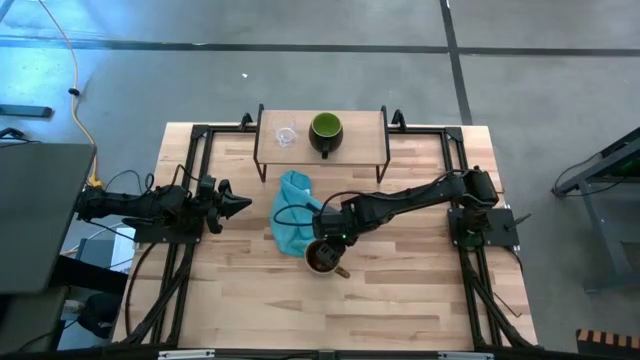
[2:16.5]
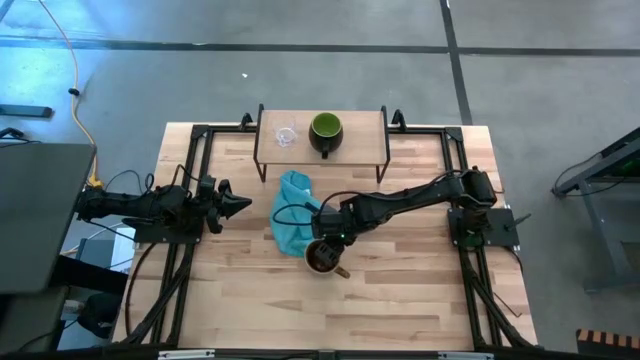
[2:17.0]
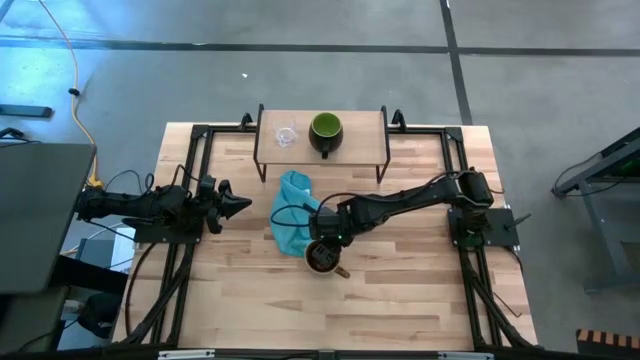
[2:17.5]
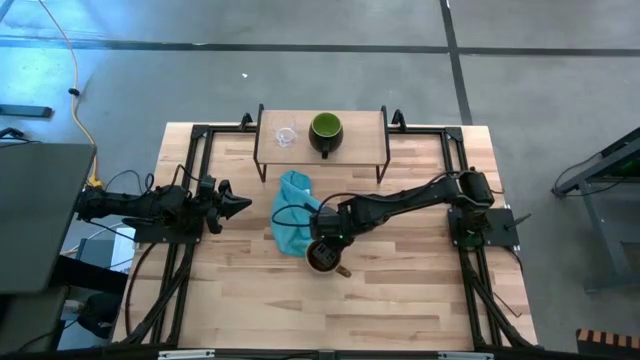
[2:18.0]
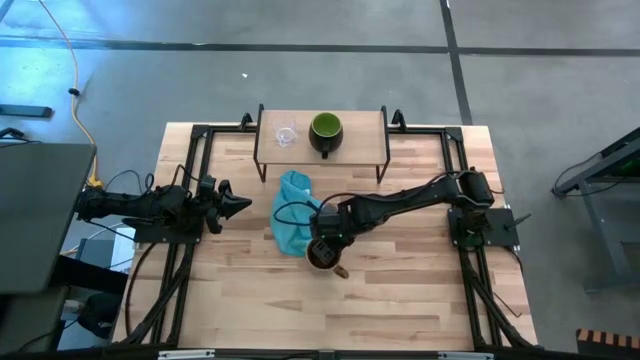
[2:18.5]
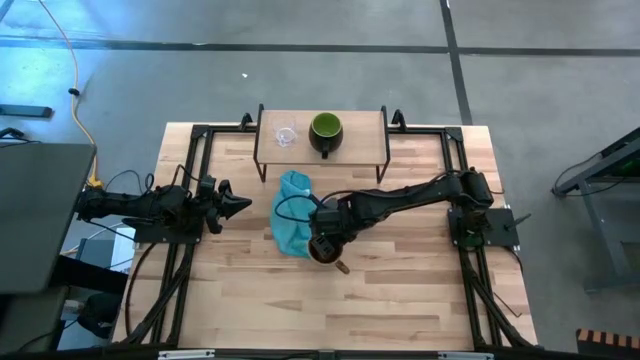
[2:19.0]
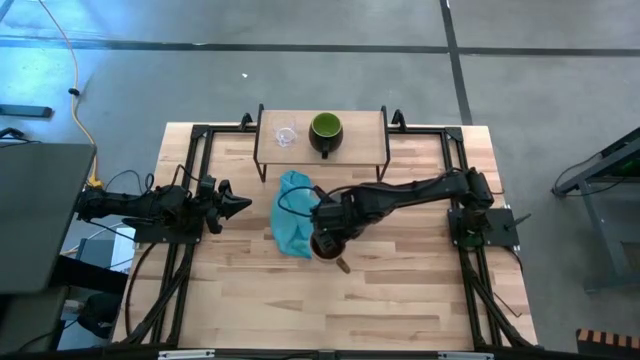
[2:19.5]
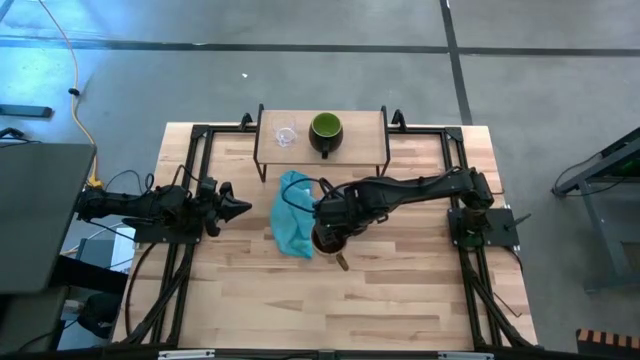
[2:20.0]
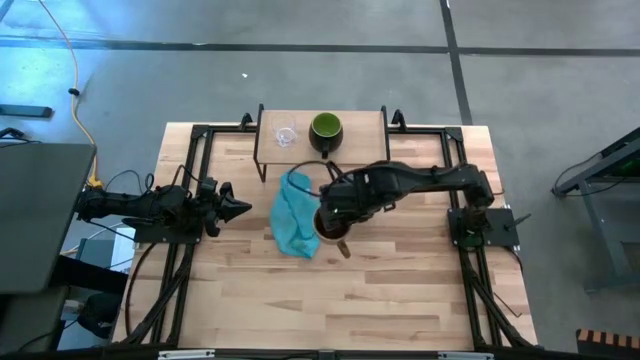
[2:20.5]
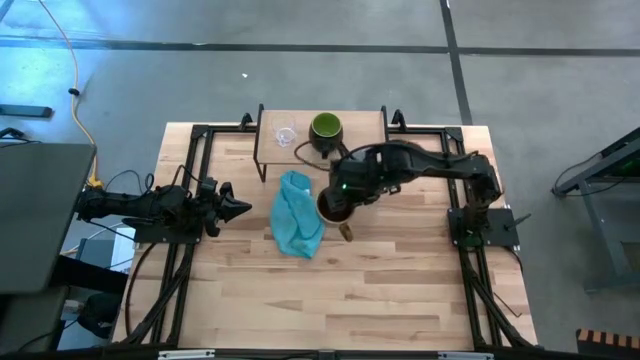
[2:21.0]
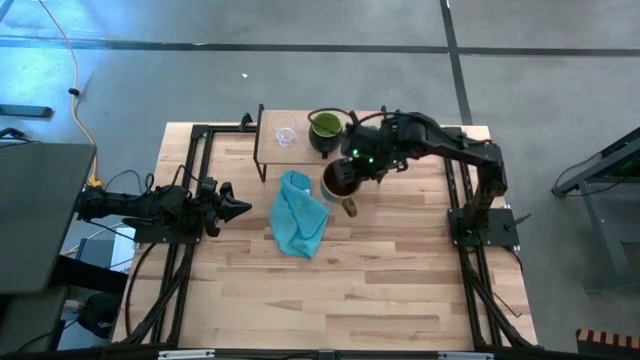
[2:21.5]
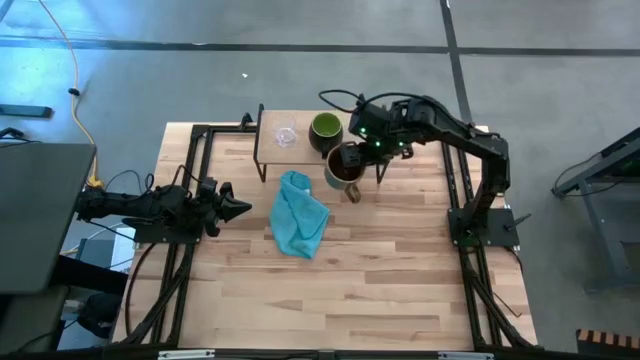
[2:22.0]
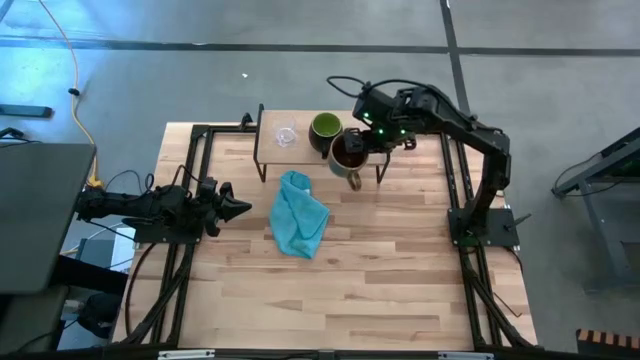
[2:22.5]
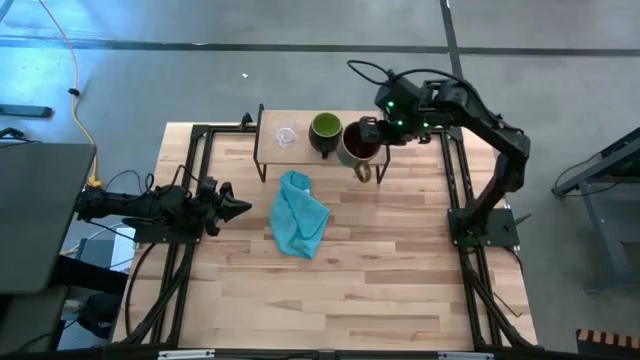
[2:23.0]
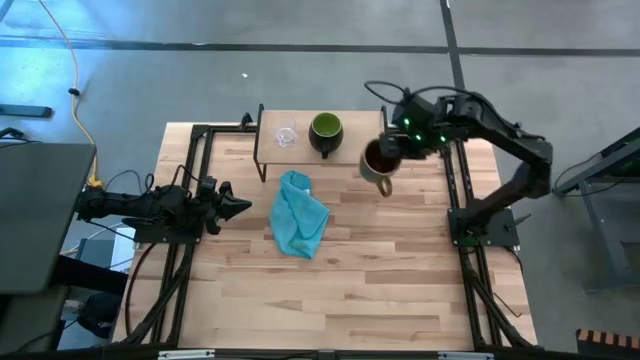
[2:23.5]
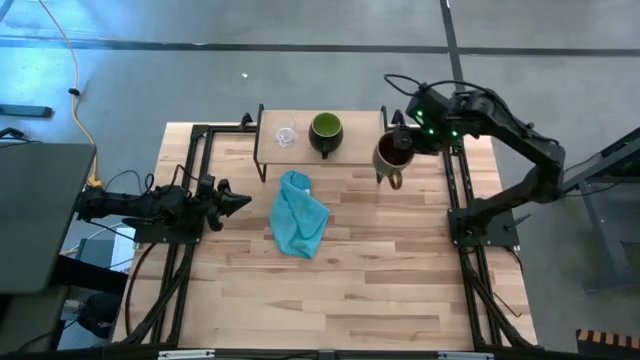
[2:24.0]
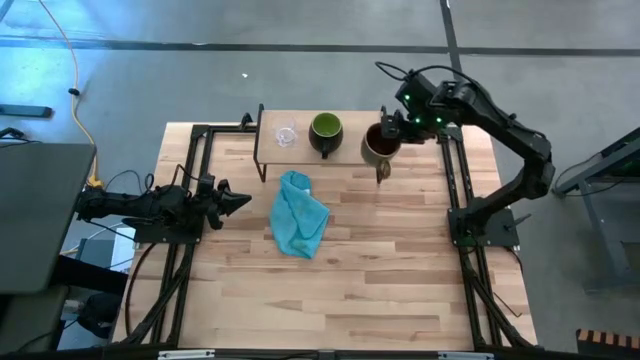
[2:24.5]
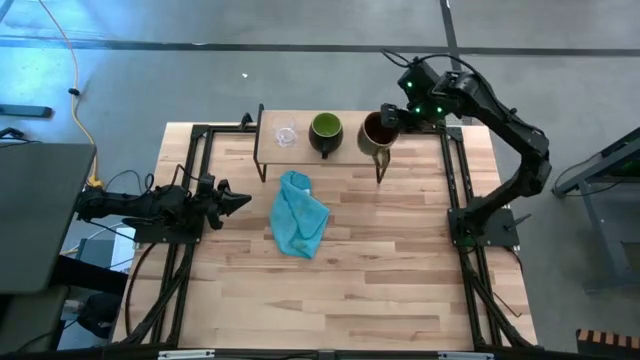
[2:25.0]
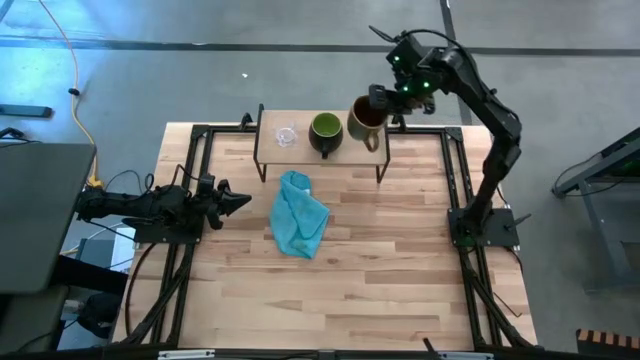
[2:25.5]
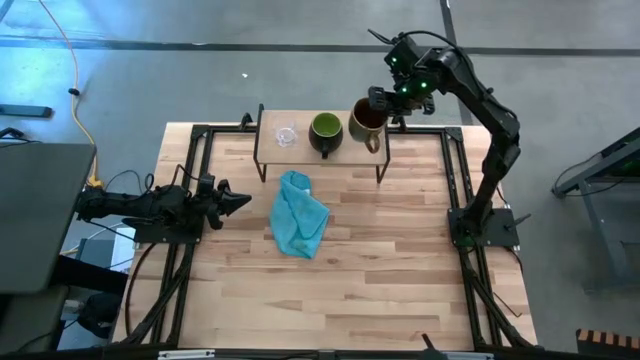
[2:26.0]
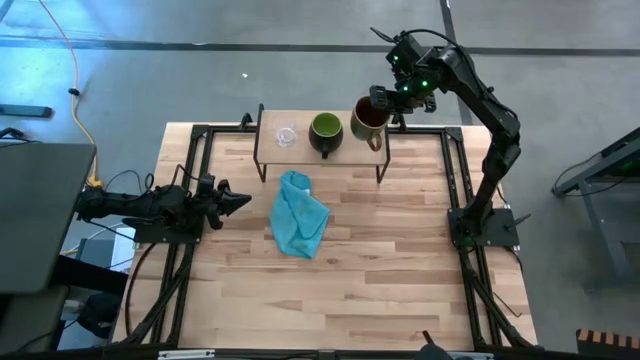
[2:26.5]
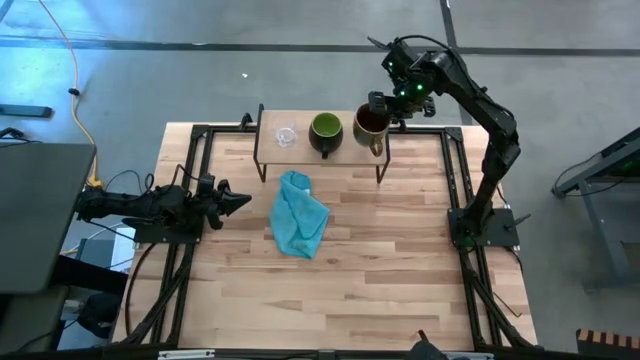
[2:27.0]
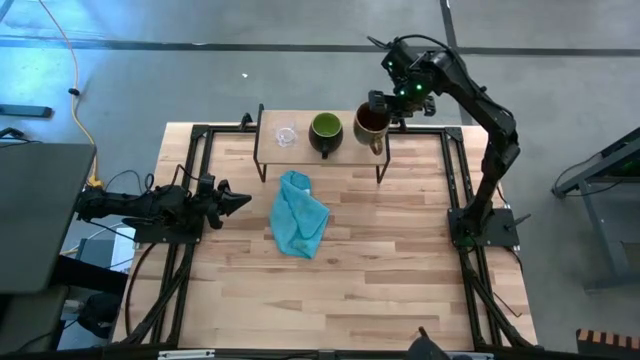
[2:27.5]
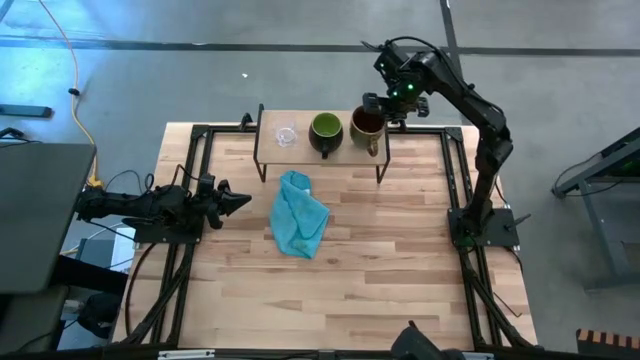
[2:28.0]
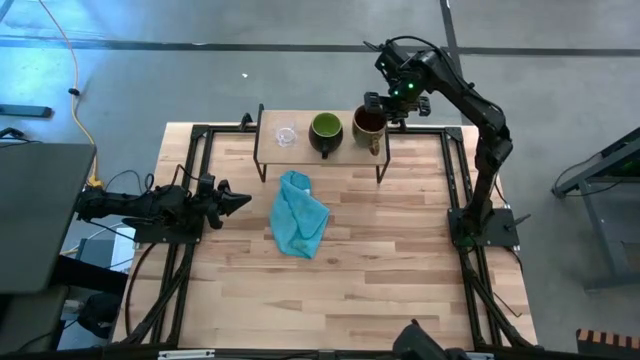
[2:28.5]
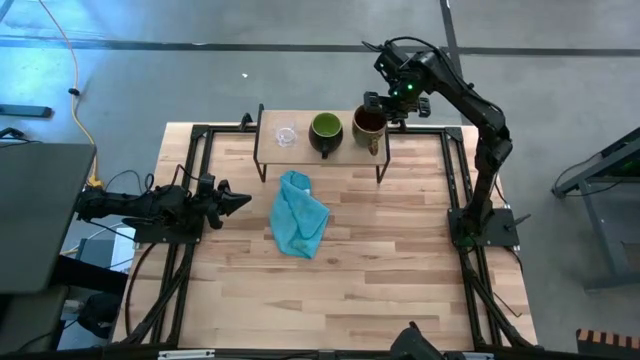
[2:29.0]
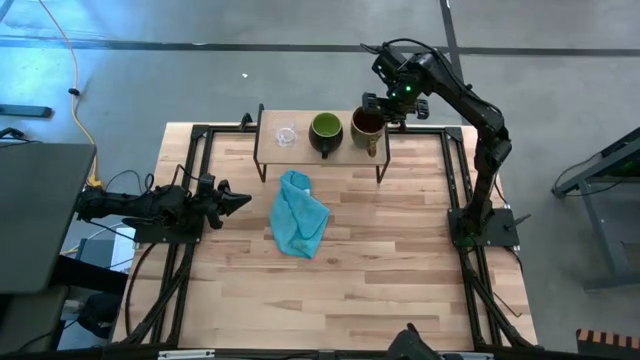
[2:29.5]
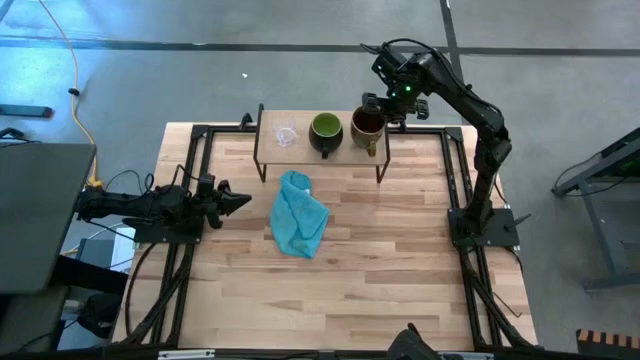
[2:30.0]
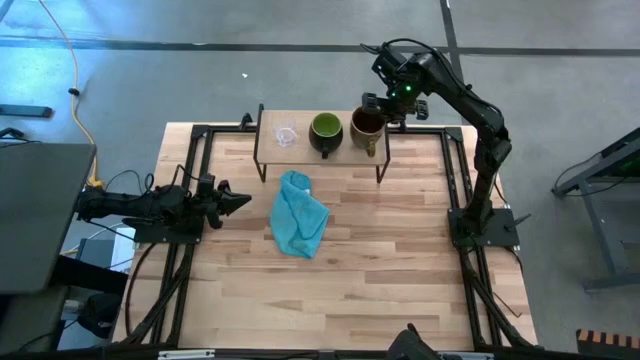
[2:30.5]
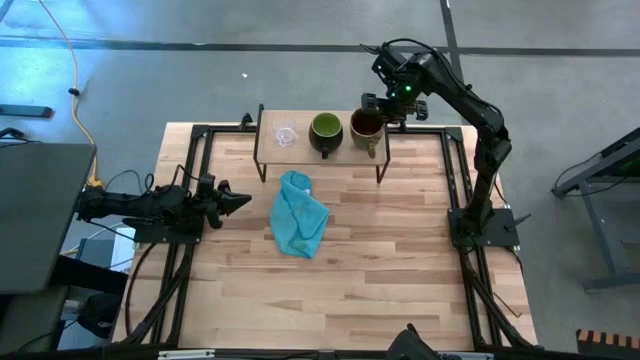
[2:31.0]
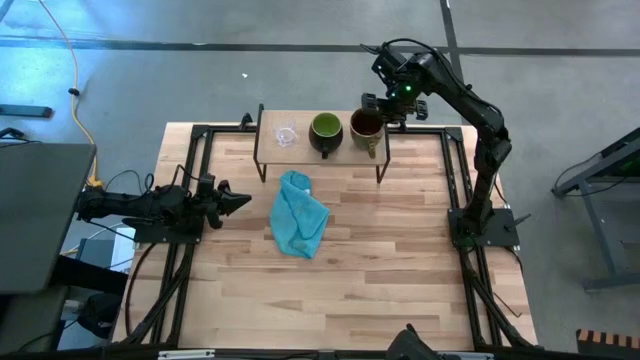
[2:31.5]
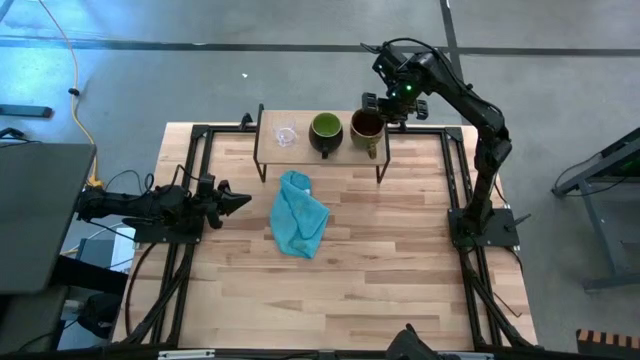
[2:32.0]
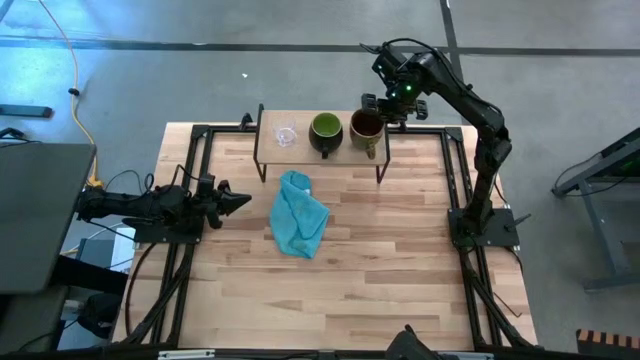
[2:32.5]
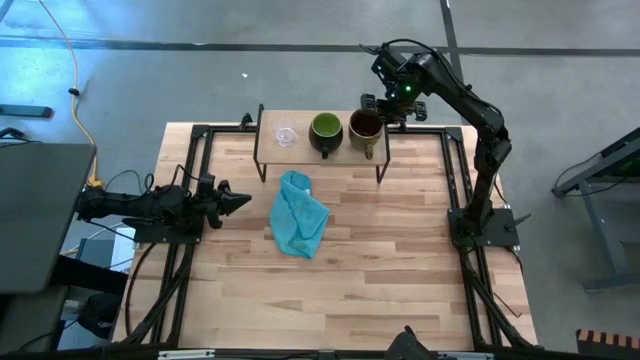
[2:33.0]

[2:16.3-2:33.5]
Task: Stack small to large cups/mugs on shelf
Put the brown mug on the shelf

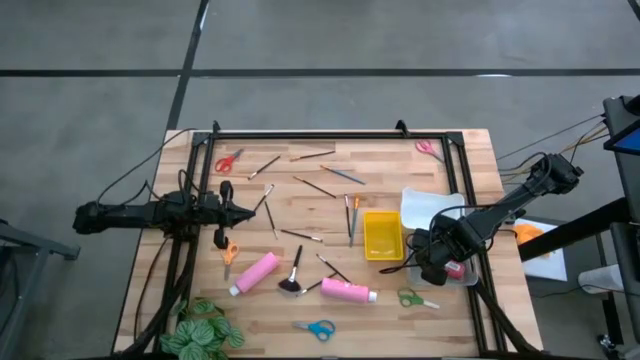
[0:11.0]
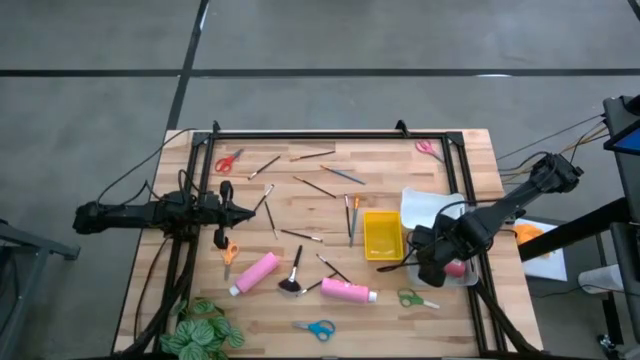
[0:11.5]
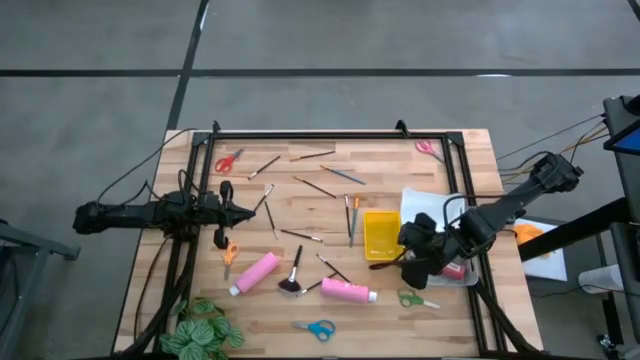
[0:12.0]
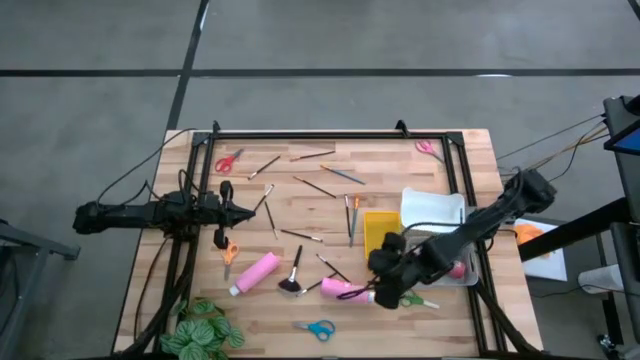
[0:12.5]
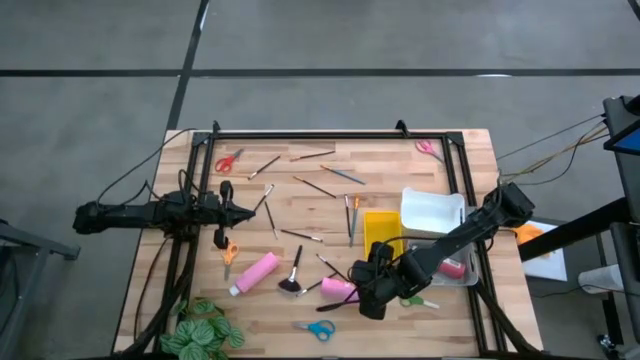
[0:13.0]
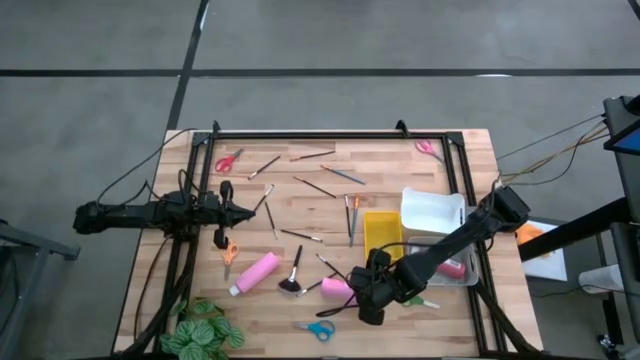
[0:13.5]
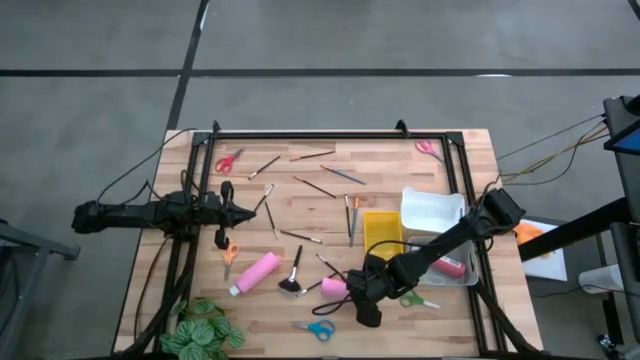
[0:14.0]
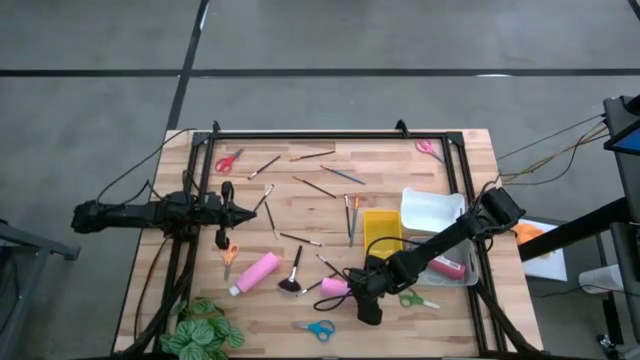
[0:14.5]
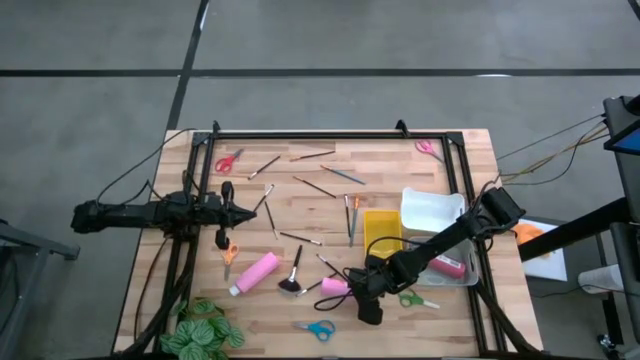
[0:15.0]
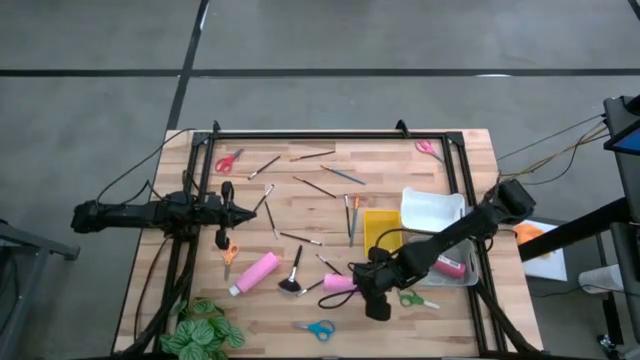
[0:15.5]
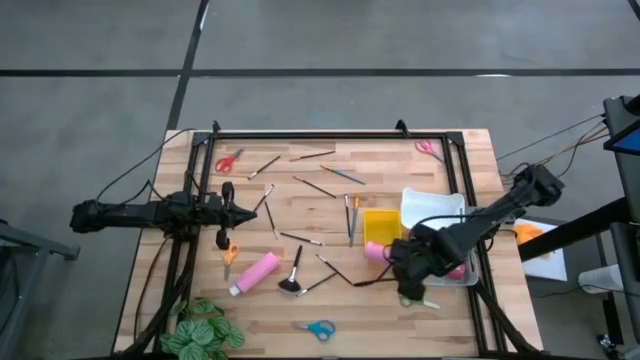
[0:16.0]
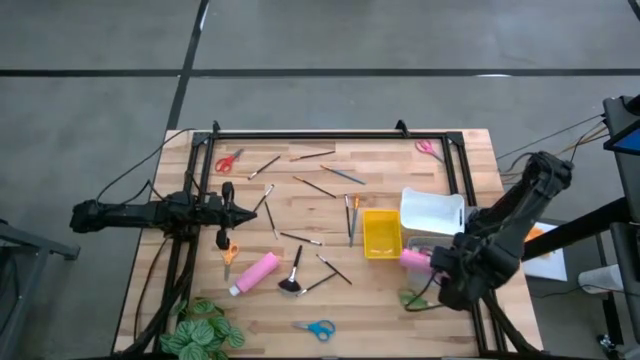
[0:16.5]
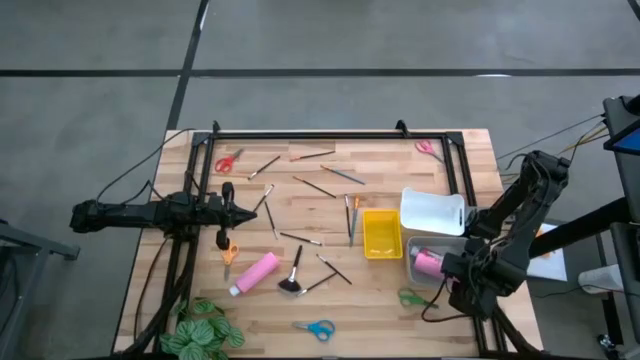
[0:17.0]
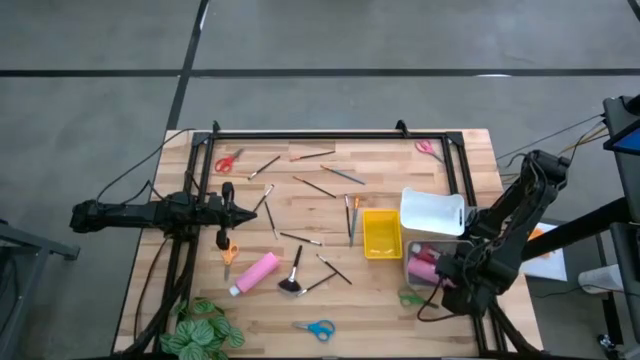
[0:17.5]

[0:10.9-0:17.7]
Task: Pick & Place Paint Supplies
Put the pink paint bottle into the gray bin
